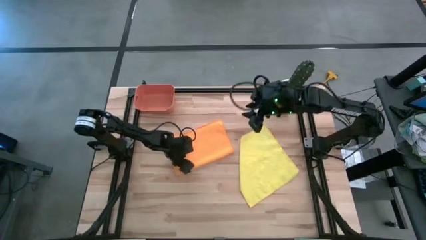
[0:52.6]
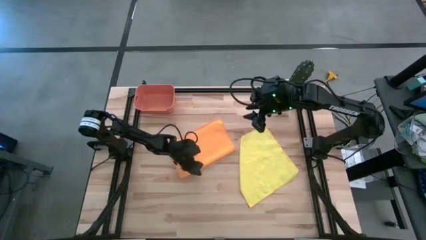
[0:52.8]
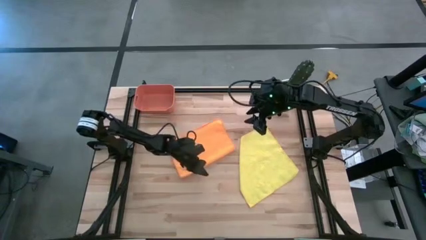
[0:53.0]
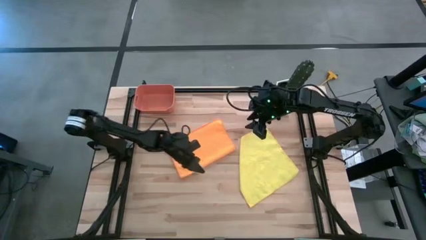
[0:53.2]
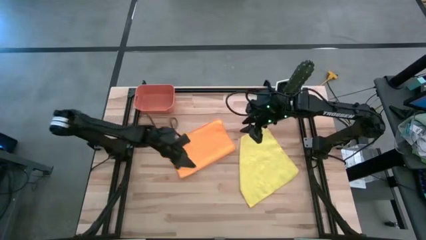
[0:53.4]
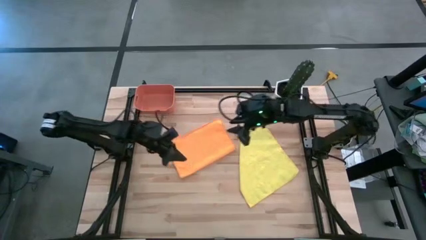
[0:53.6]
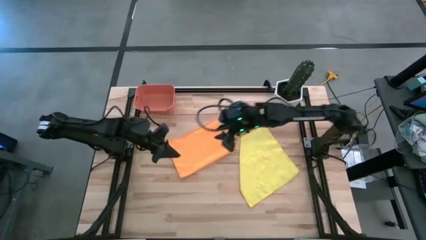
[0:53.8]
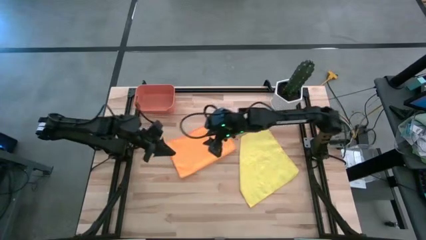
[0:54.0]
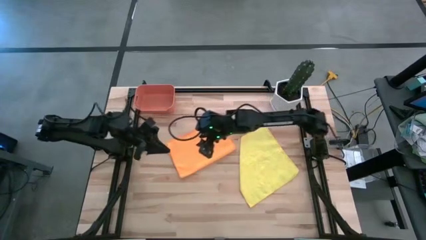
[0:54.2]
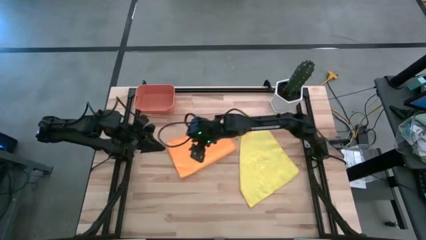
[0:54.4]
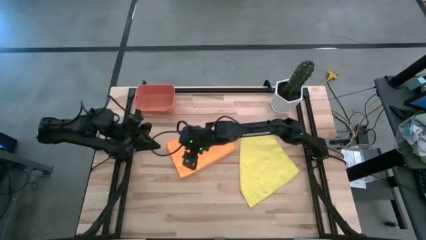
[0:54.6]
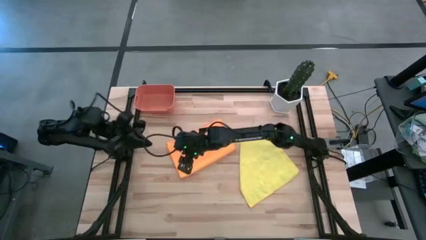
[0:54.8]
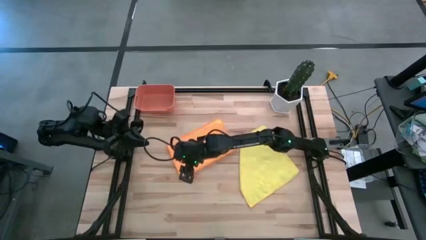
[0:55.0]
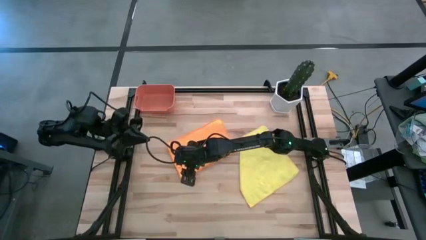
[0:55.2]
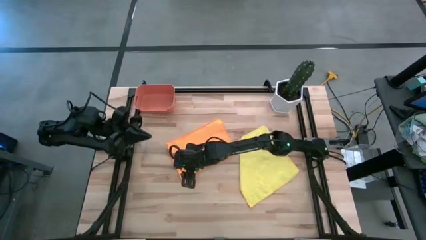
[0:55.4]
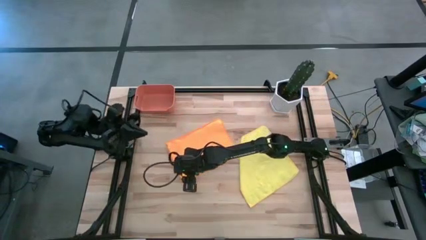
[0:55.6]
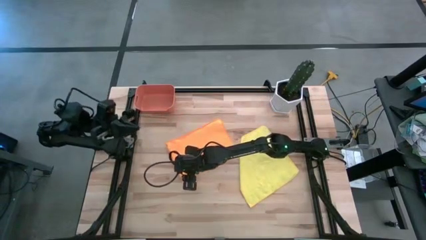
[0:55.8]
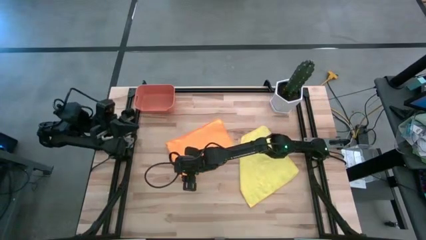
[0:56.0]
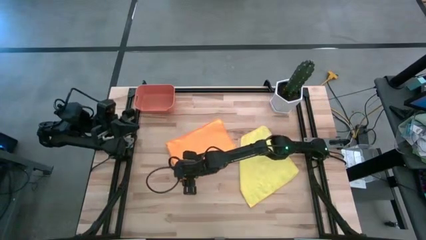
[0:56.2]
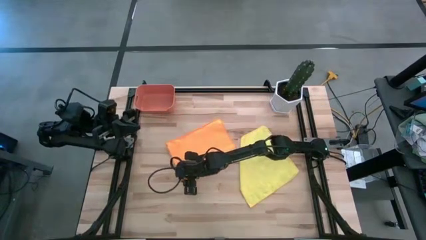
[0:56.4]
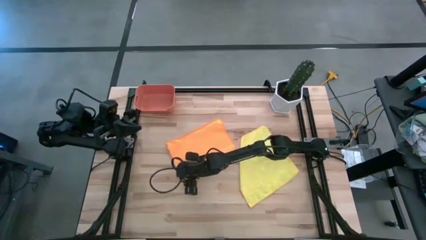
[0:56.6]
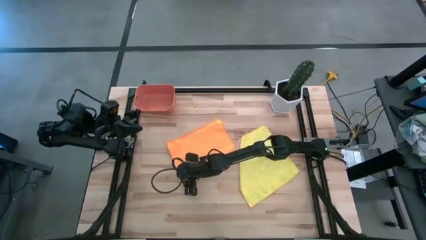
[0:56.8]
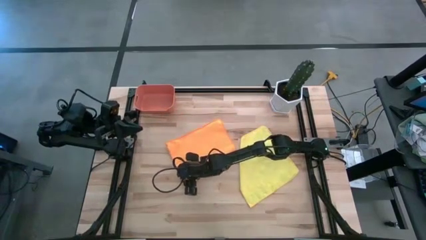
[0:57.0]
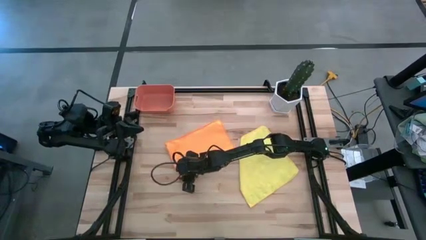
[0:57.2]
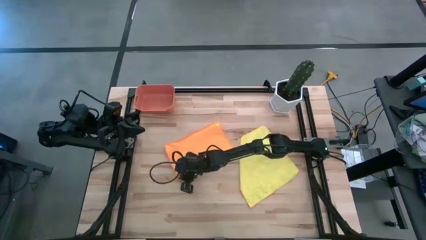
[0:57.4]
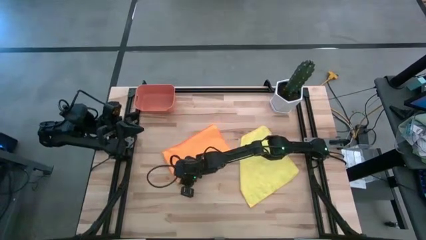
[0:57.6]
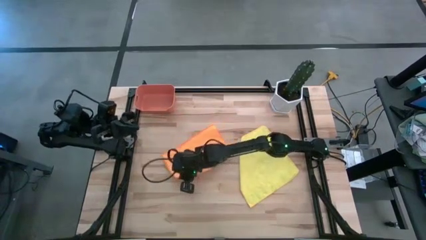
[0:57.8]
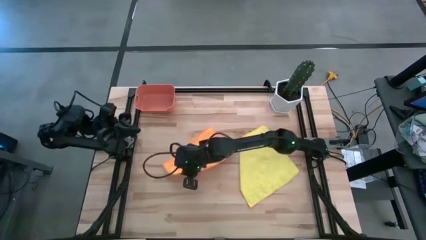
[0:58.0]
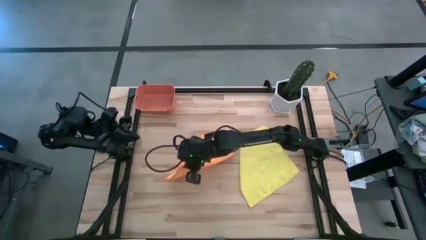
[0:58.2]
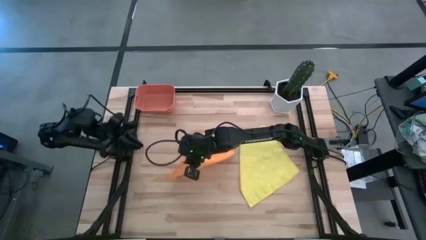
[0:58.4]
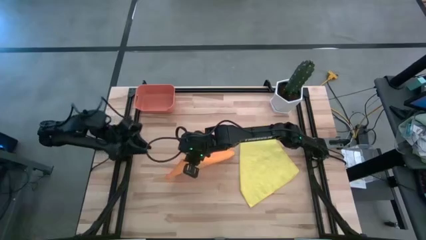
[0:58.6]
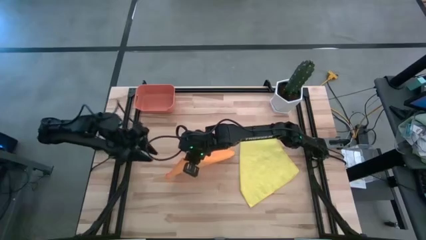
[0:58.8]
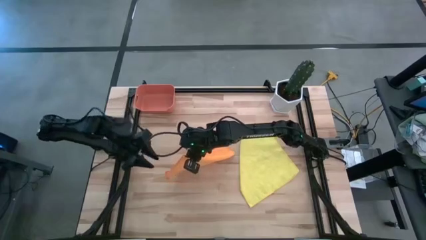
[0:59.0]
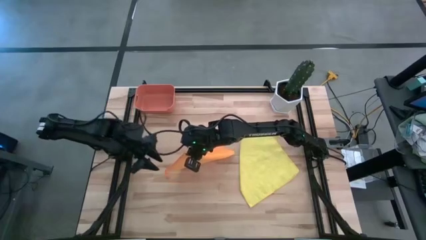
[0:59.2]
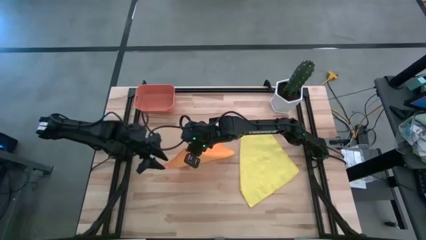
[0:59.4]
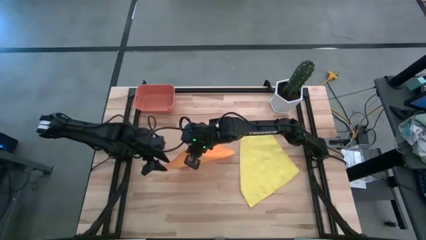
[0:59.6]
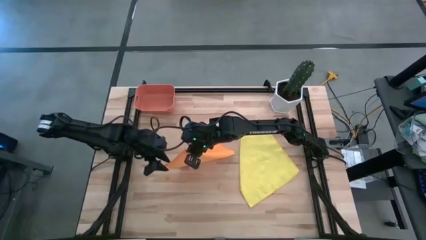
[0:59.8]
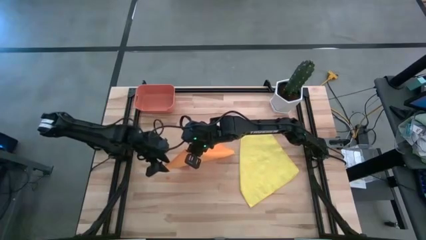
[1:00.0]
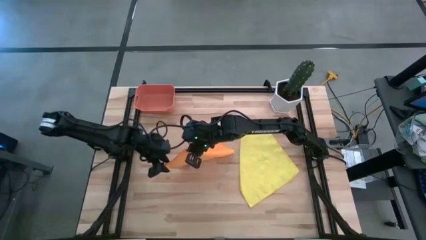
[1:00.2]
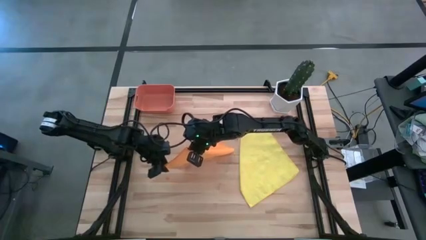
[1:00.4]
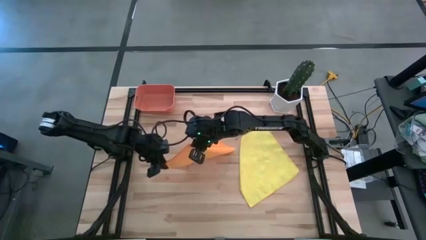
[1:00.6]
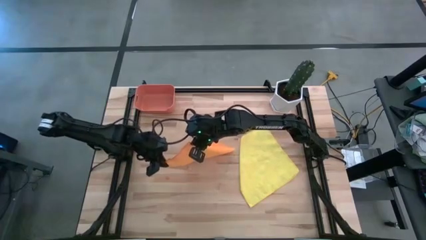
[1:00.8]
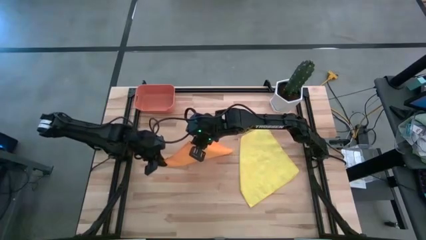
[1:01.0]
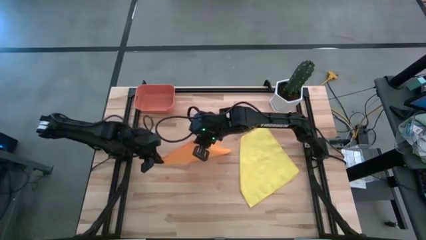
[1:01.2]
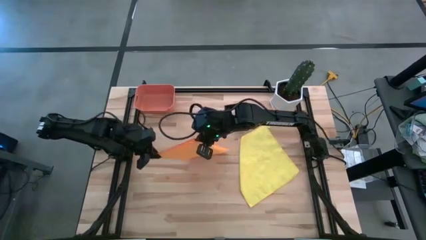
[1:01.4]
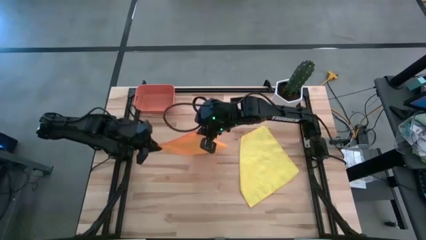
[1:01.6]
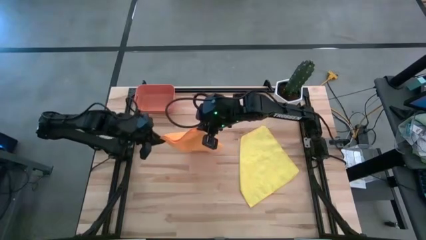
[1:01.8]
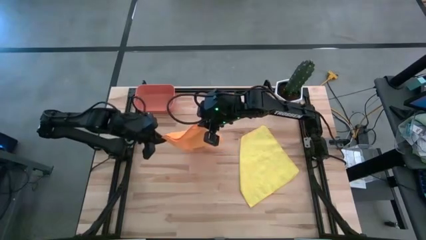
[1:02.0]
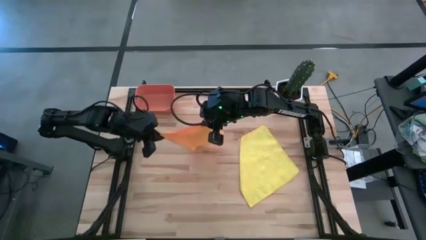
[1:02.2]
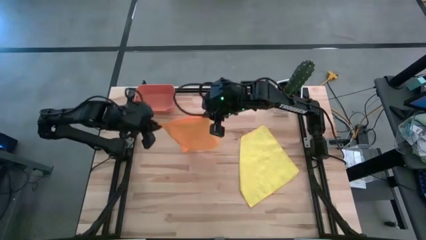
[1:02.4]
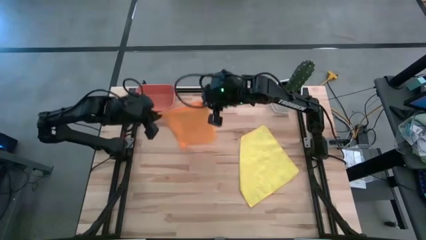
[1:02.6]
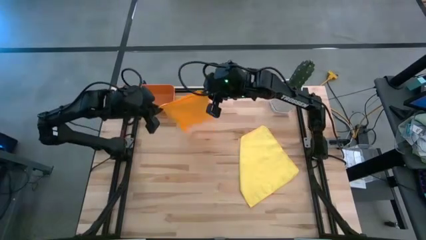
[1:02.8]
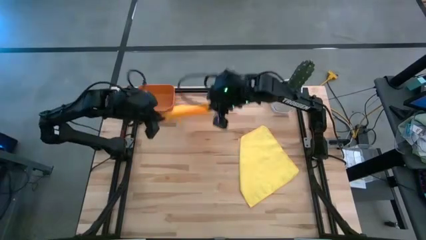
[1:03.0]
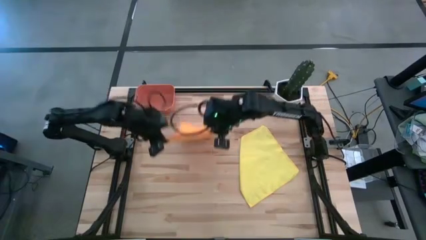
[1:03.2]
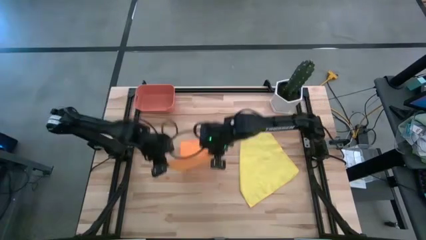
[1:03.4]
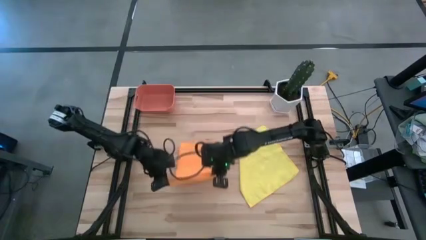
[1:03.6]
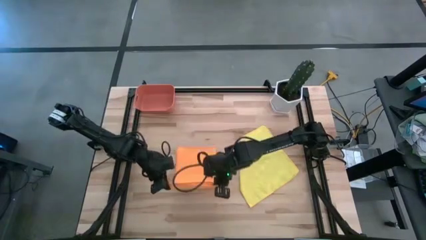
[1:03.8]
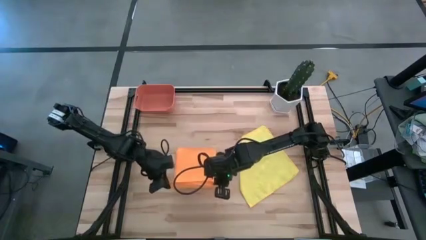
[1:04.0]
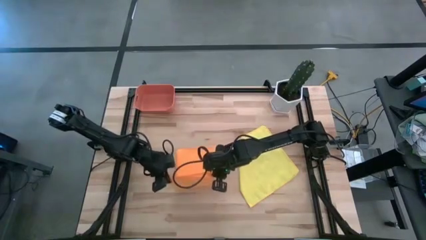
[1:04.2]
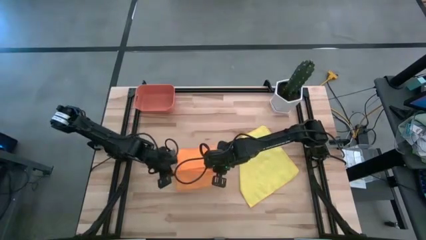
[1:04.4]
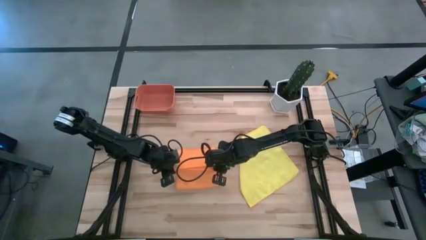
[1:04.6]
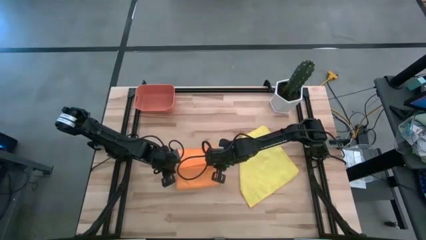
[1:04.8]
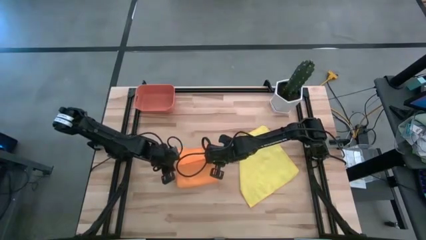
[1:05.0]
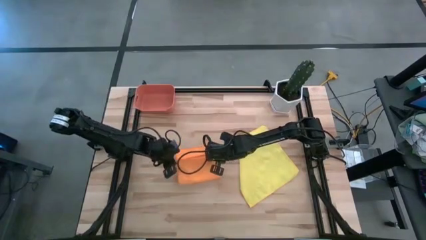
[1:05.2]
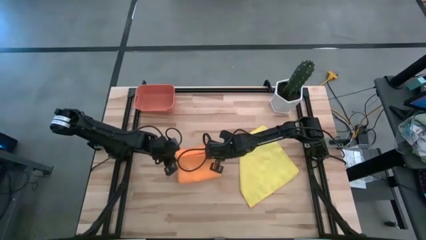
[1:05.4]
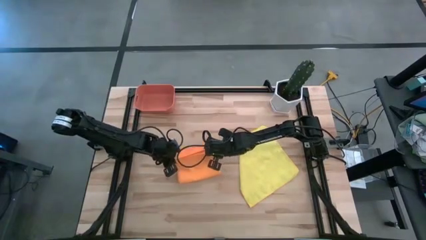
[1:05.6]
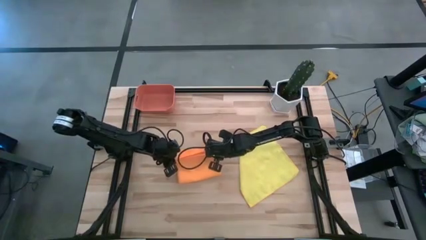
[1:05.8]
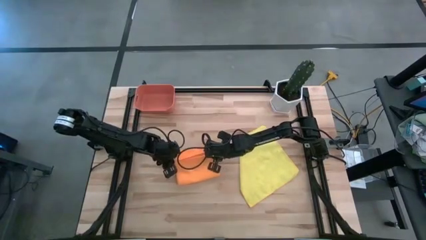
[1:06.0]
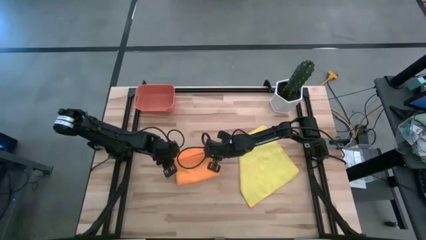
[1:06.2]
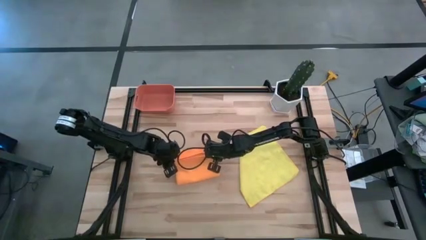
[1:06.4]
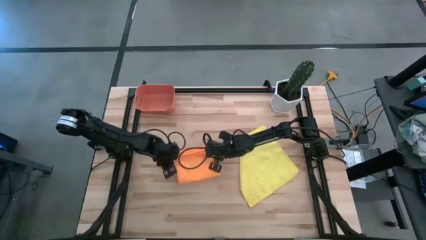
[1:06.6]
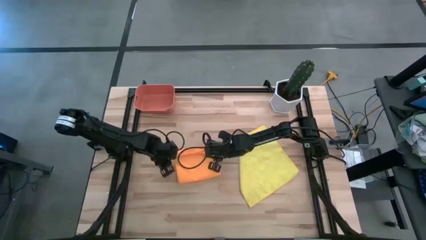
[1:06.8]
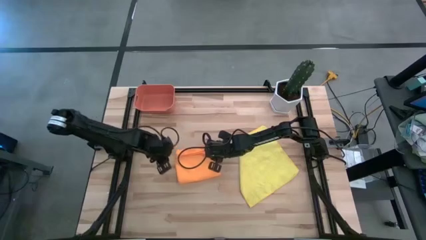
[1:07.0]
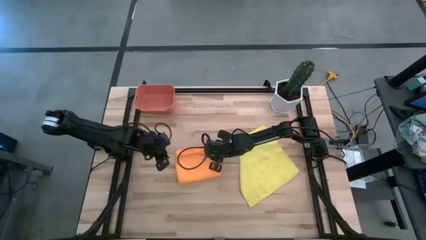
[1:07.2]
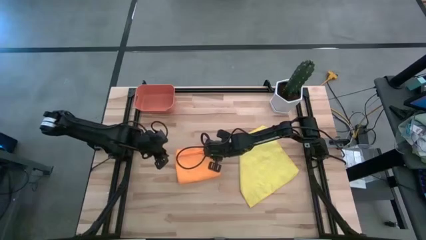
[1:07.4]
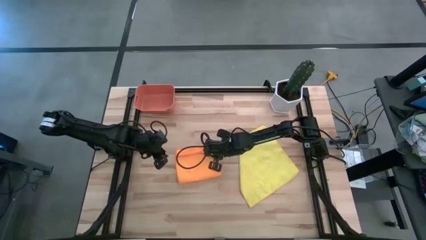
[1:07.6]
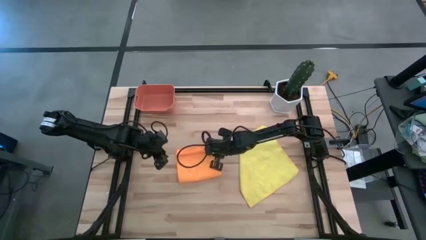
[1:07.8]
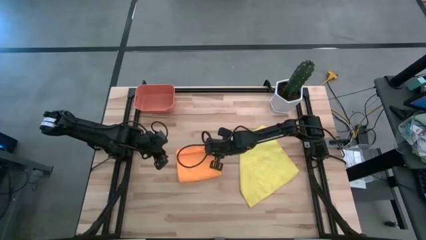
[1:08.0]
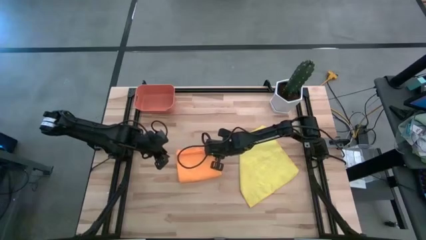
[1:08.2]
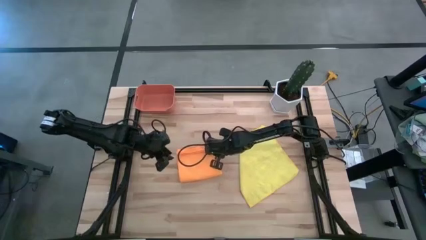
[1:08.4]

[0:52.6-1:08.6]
Task: Roll microfiber towels into tight, uniform cylinder then place into a basket
Fold the orange towel
